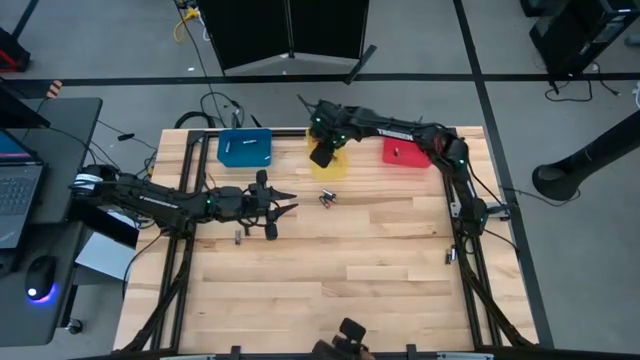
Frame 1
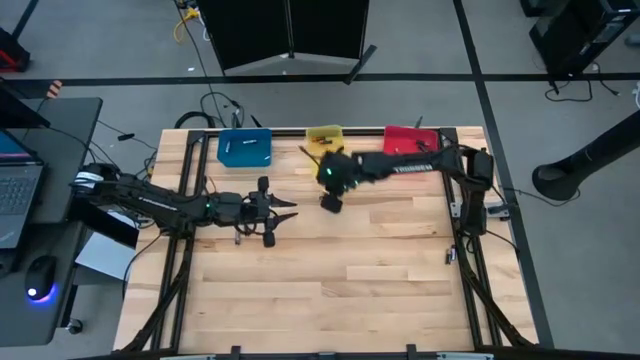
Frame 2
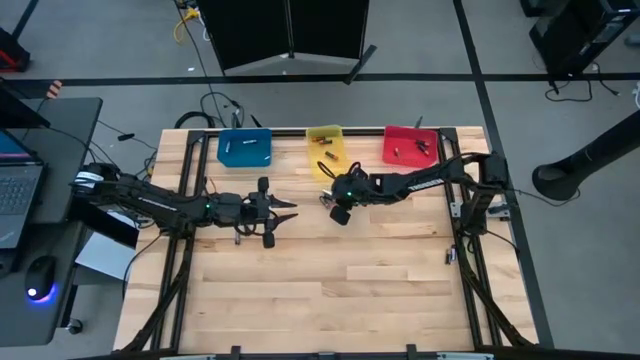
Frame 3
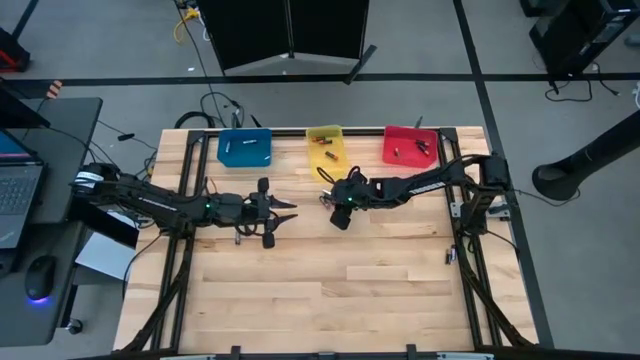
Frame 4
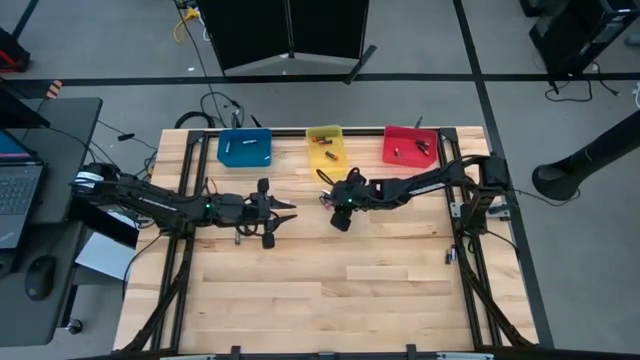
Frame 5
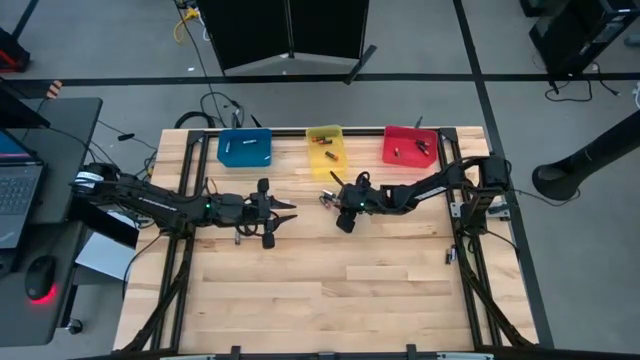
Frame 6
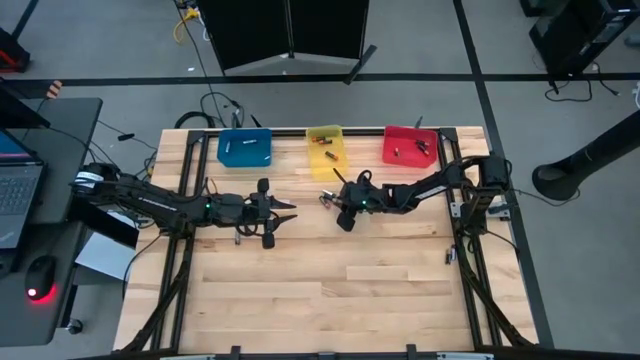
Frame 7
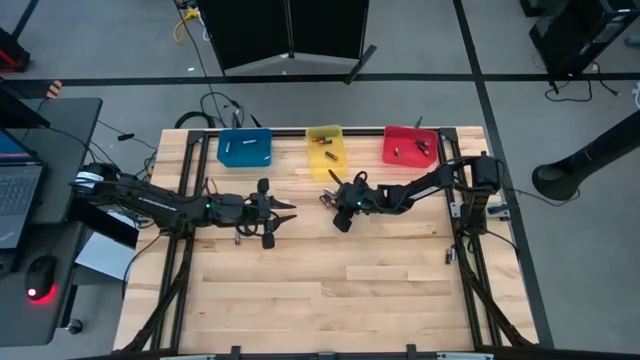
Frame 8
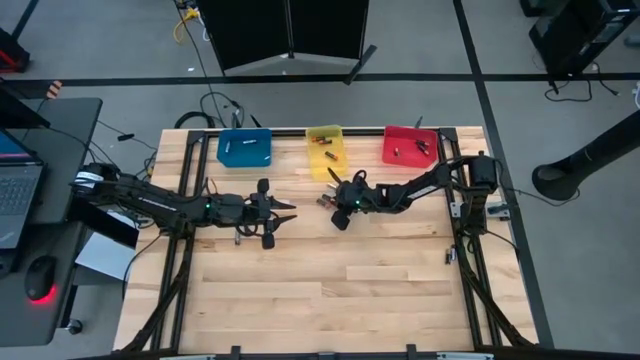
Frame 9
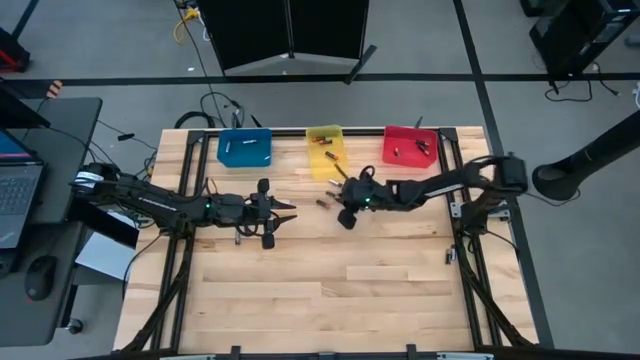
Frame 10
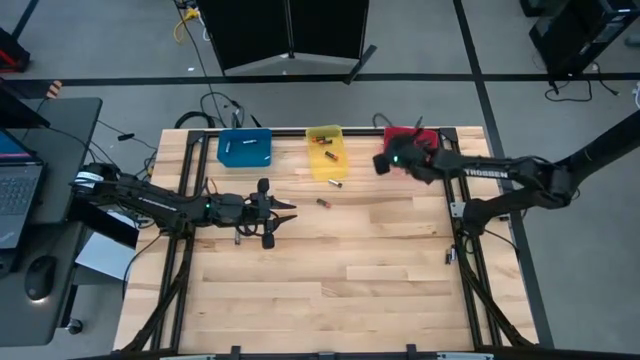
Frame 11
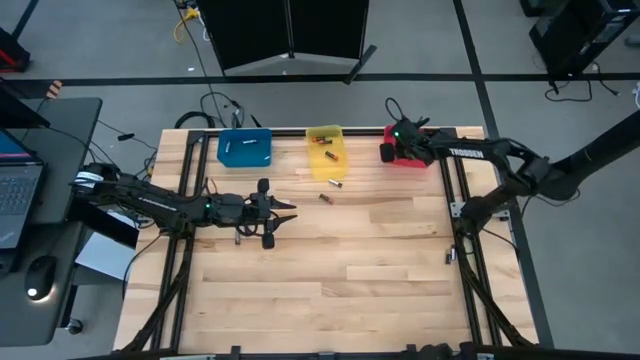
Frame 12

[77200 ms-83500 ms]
Task: Sort batteries
Put the top black brown battery into the red bin

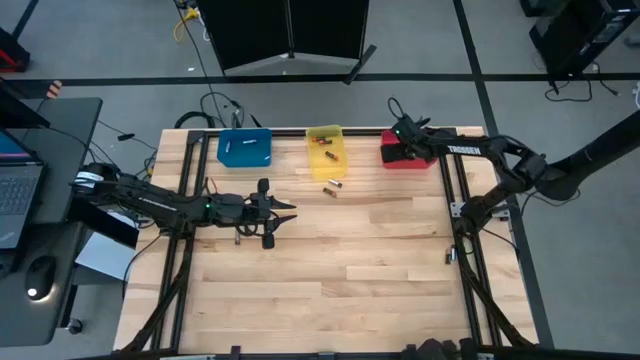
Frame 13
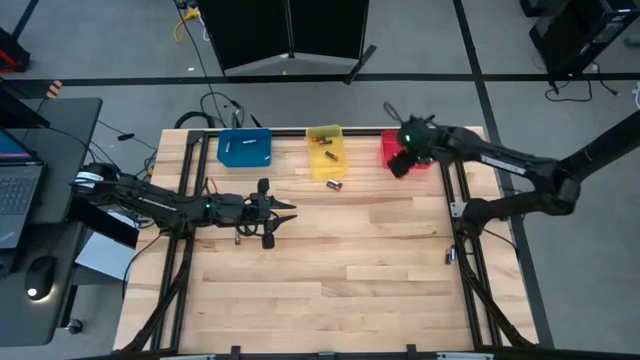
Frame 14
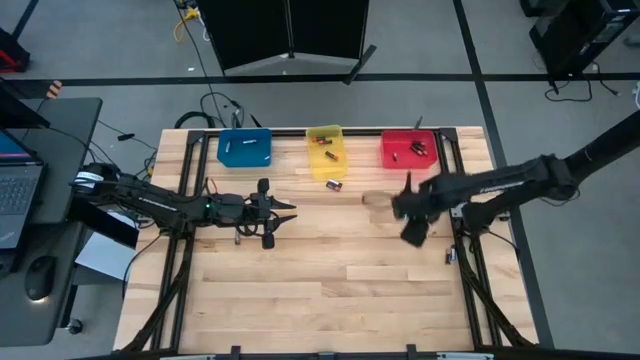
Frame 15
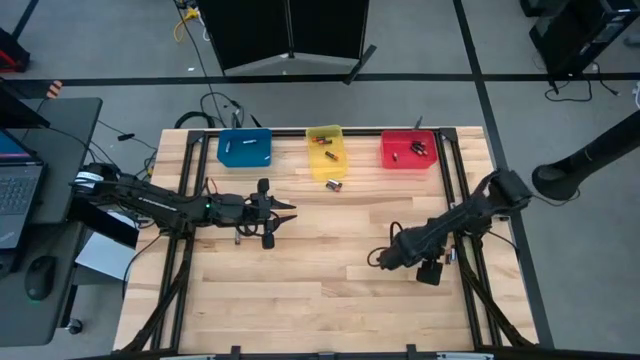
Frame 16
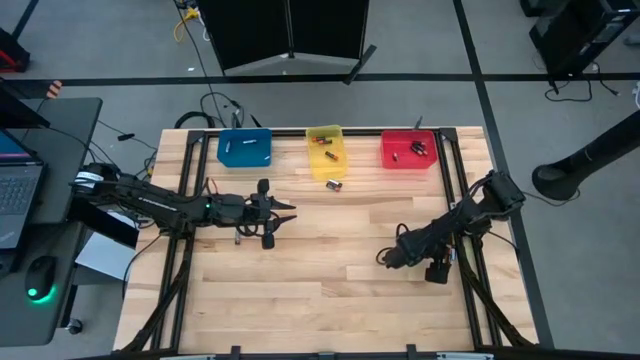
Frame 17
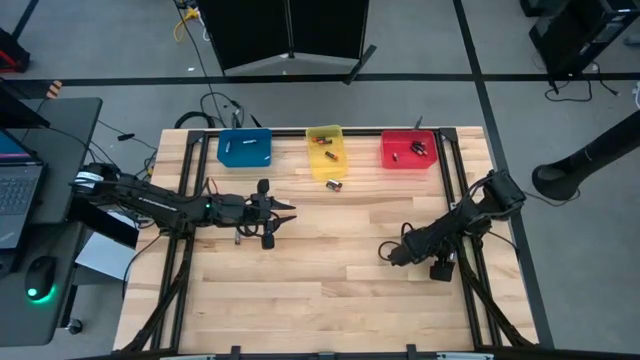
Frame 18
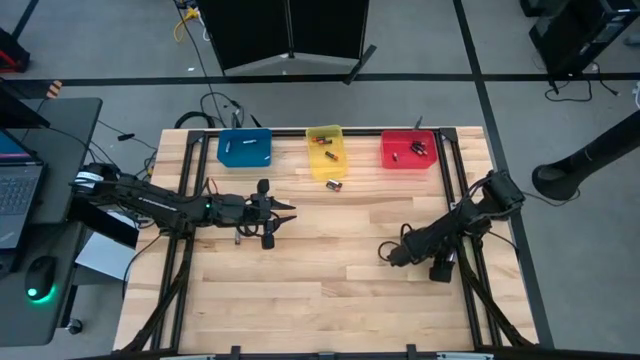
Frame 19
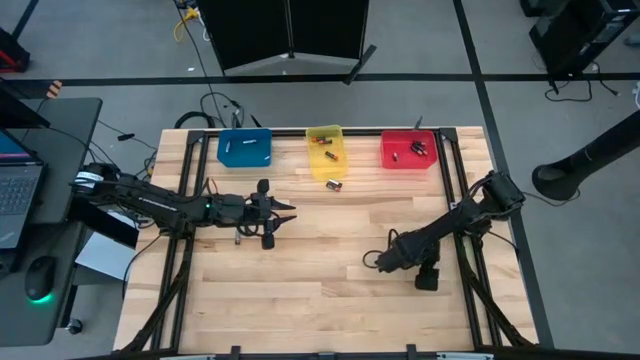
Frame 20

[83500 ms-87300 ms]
Put the bottom right silver battery into the blue bin

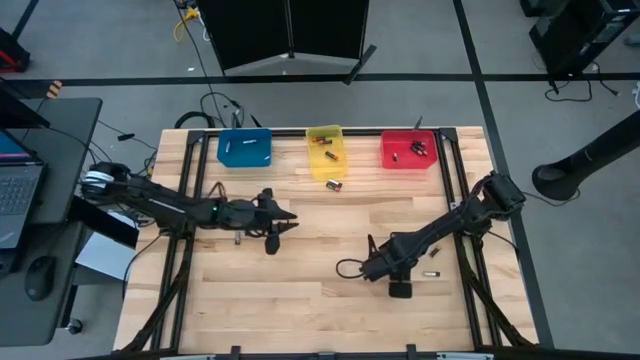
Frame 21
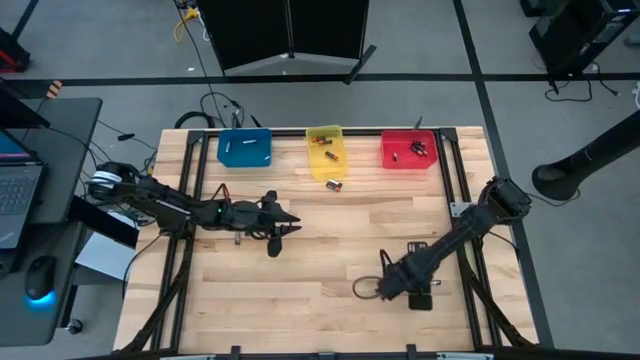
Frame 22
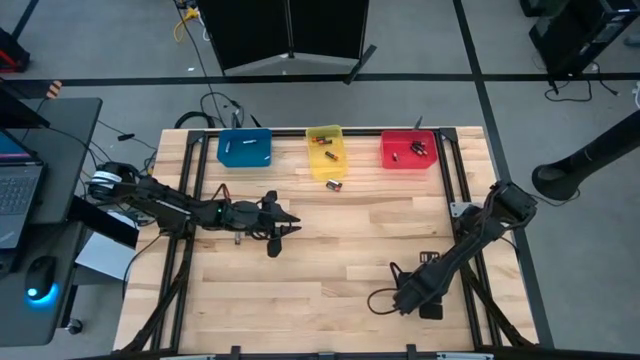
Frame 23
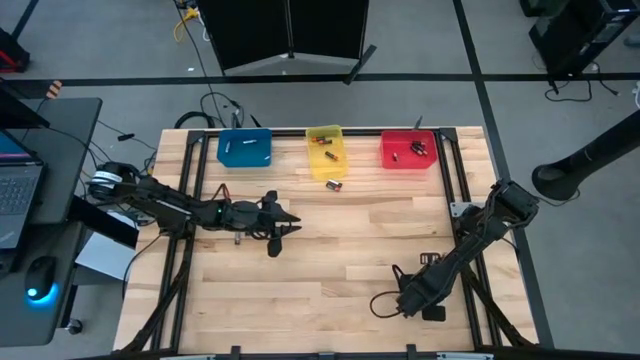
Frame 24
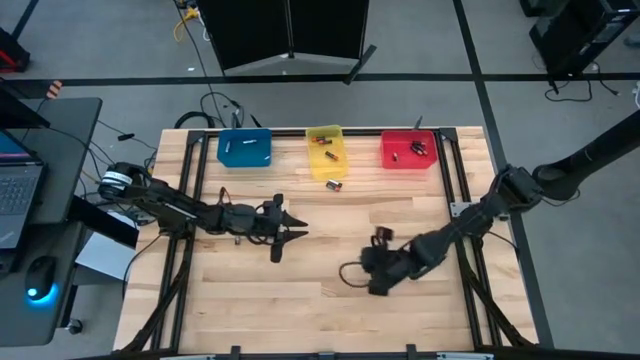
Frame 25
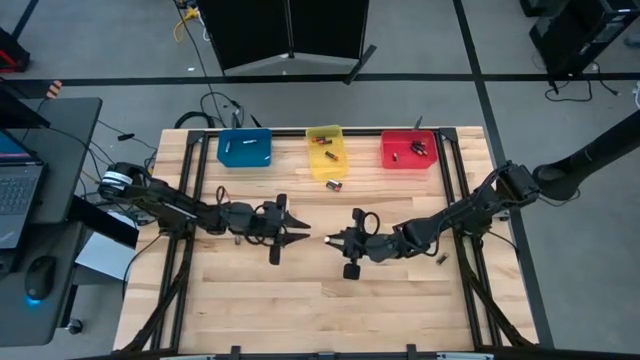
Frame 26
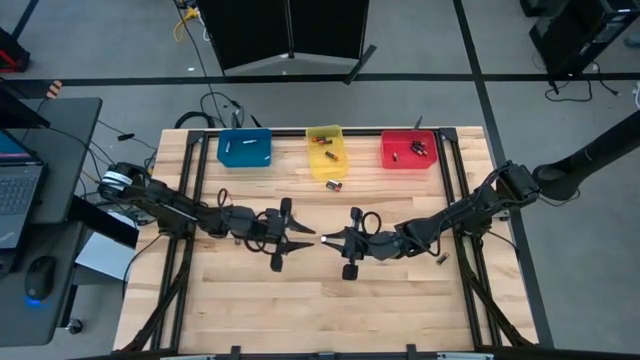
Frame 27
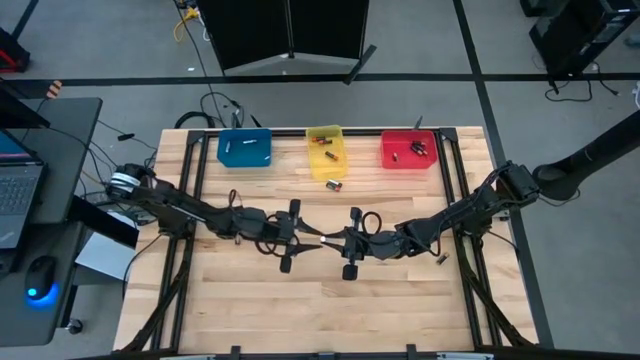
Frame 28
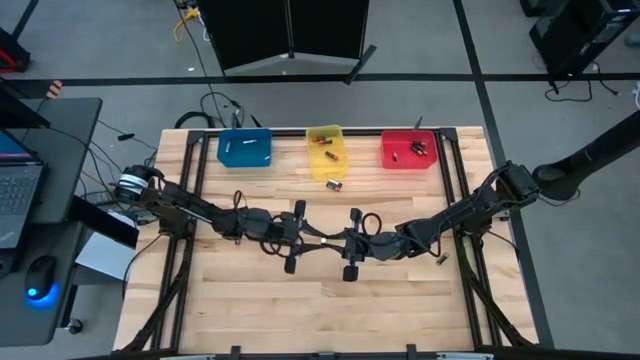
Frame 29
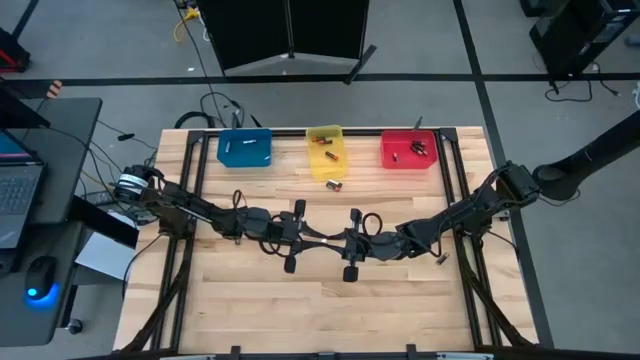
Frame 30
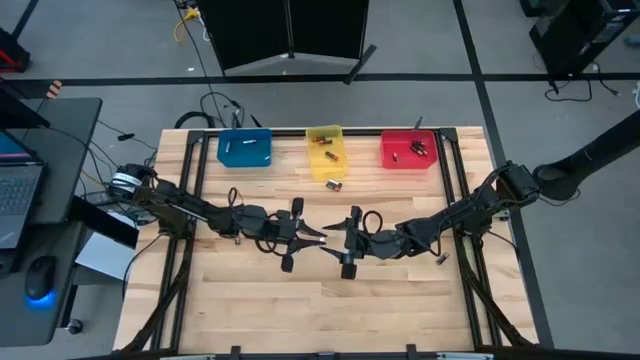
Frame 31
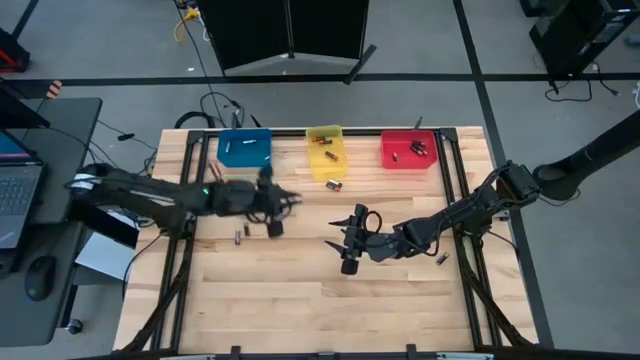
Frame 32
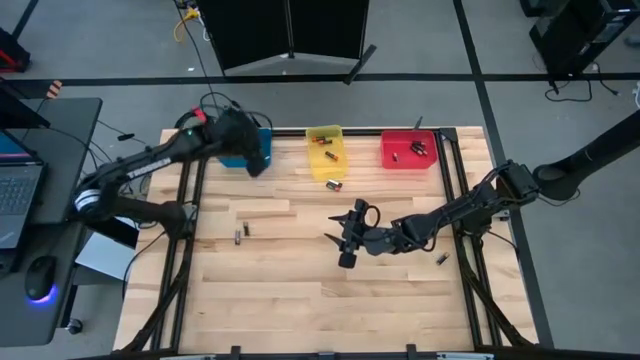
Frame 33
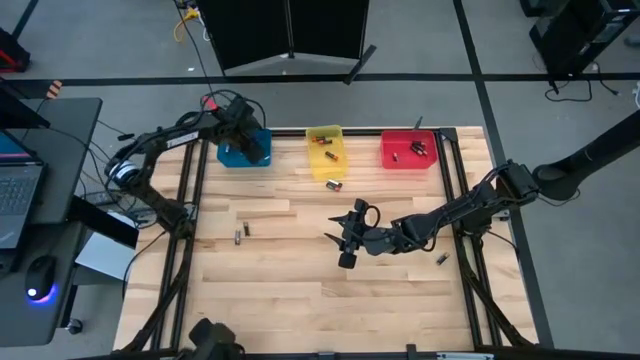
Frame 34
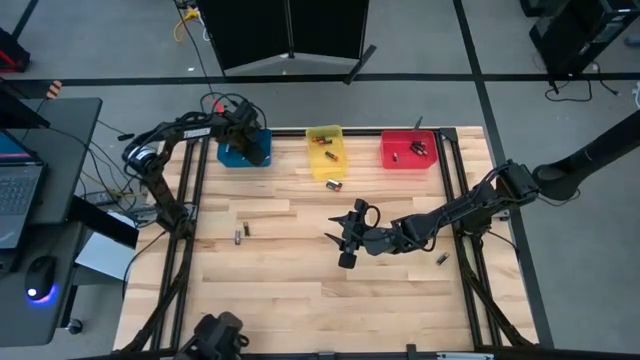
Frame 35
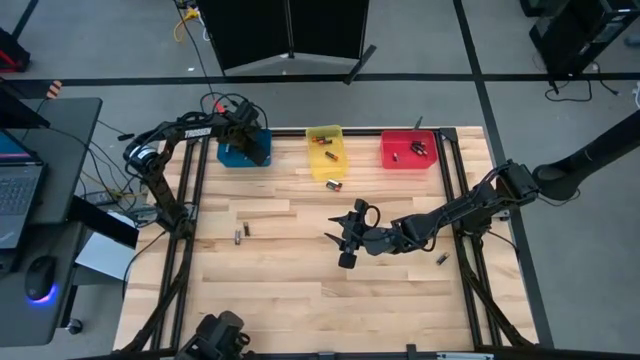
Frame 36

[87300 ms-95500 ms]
Put the bottom right silver battery into the blue bin

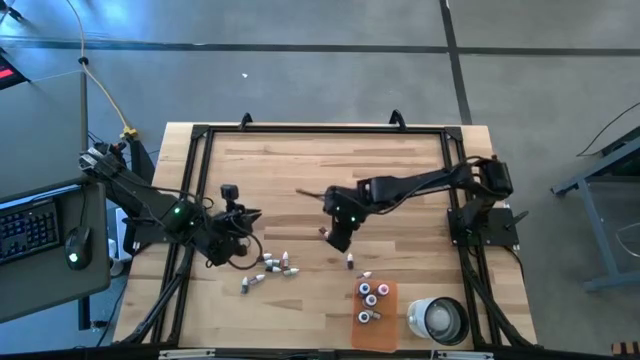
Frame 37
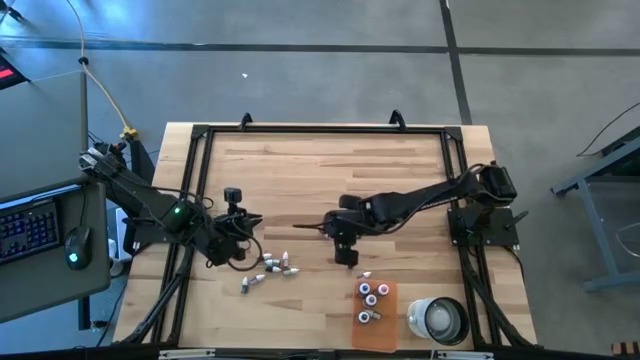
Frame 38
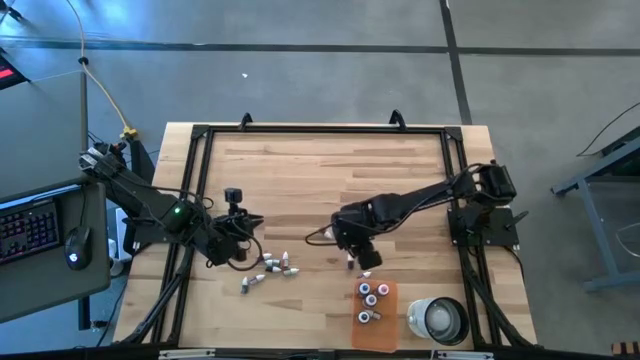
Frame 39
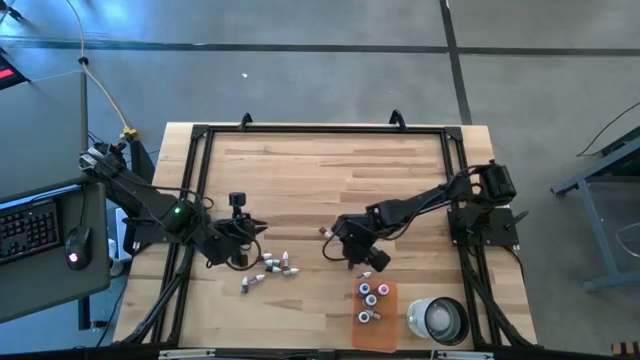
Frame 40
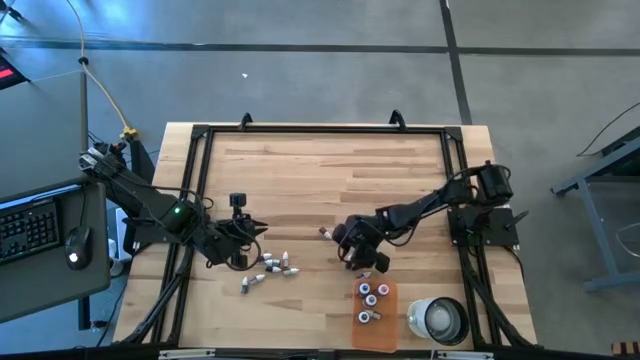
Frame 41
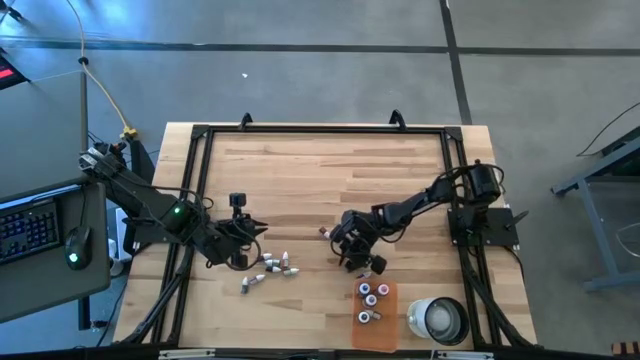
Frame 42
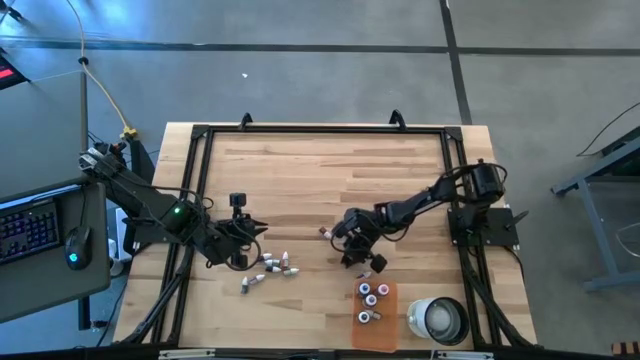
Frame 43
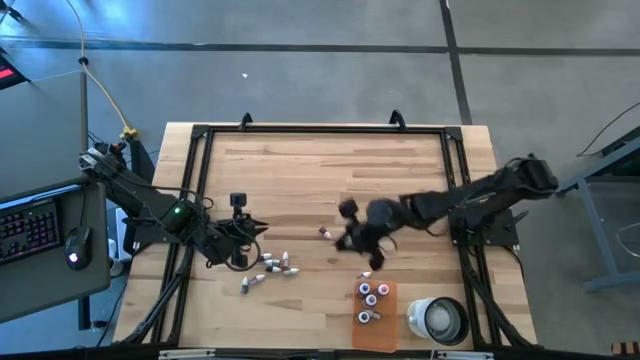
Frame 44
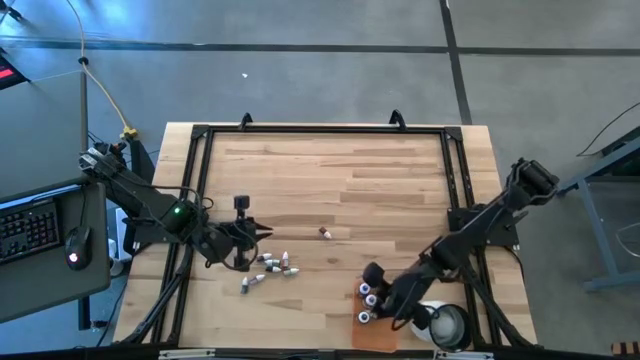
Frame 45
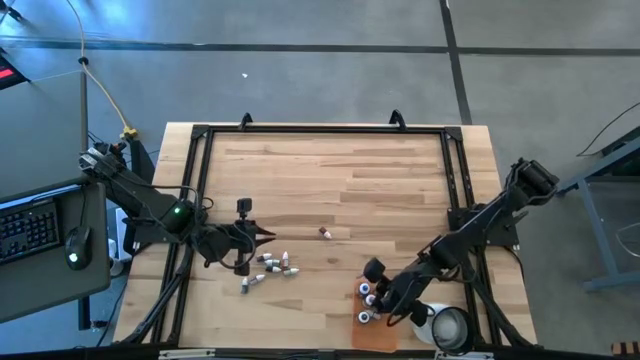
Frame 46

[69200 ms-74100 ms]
Task: Pick & Place food coloring
Put the top right small green food coloring bottle into the orange bin
